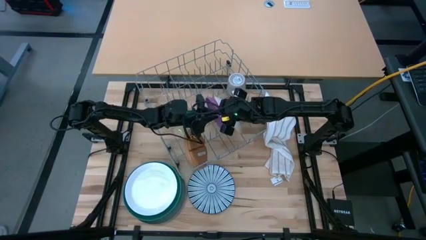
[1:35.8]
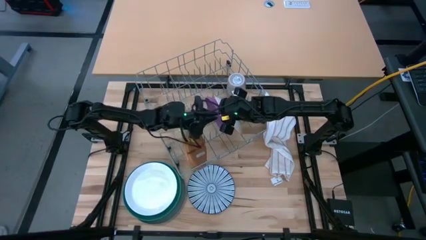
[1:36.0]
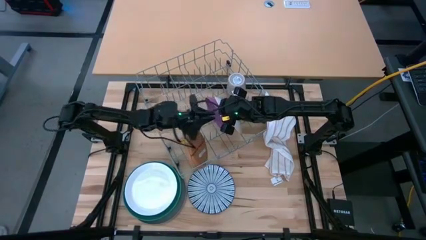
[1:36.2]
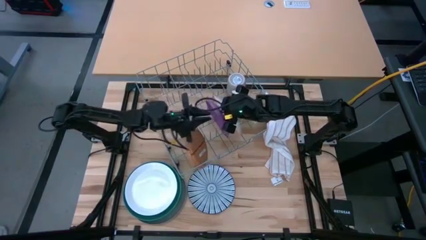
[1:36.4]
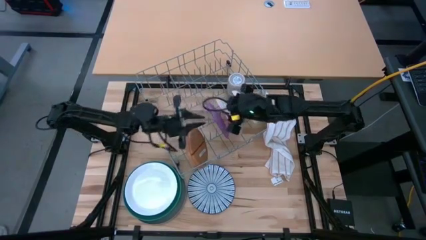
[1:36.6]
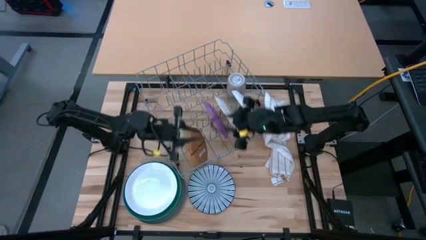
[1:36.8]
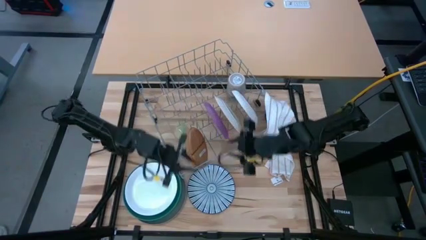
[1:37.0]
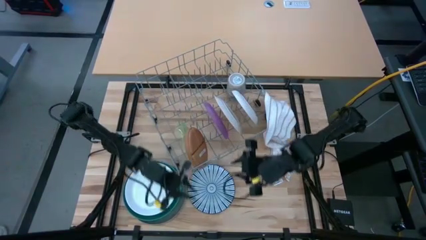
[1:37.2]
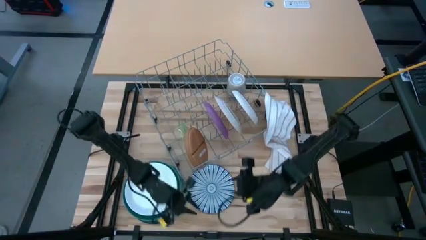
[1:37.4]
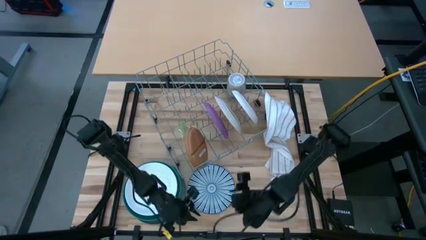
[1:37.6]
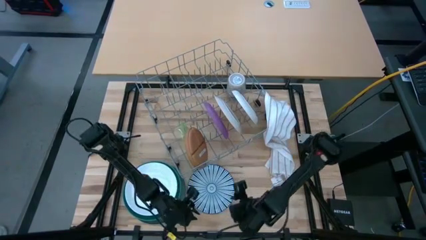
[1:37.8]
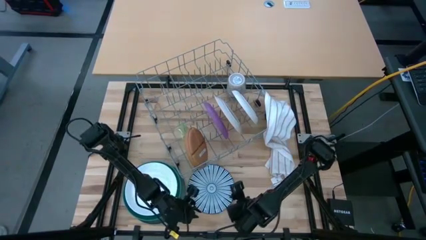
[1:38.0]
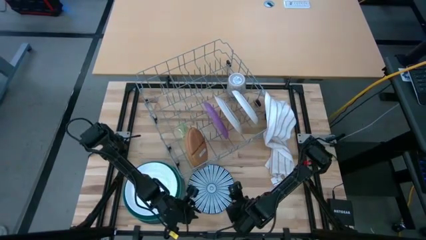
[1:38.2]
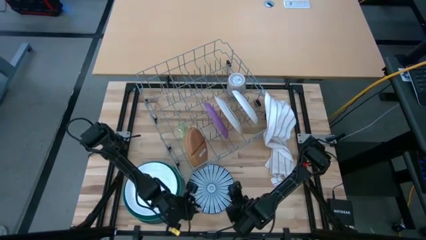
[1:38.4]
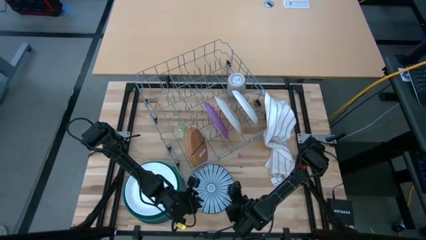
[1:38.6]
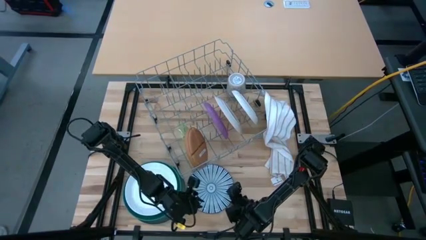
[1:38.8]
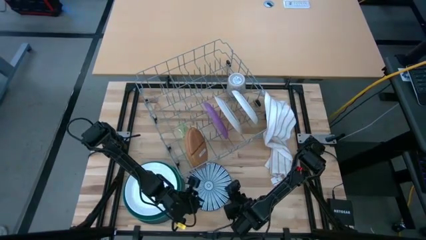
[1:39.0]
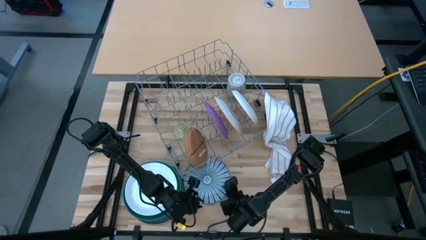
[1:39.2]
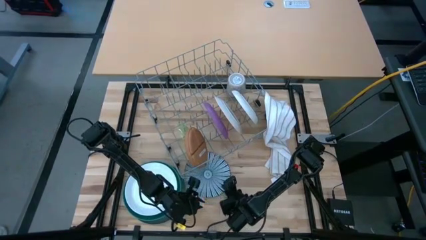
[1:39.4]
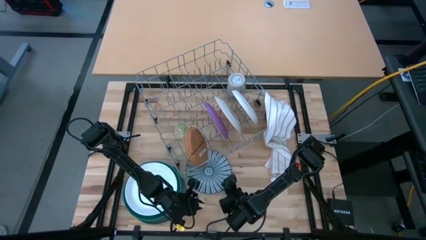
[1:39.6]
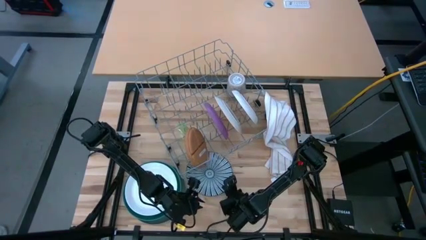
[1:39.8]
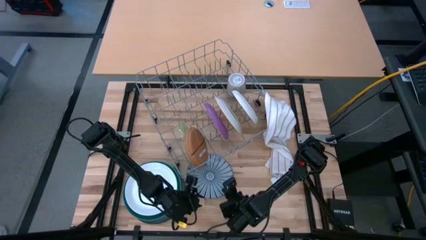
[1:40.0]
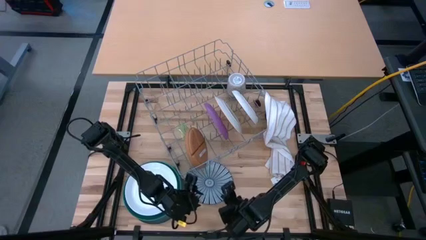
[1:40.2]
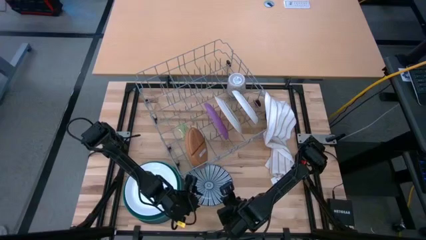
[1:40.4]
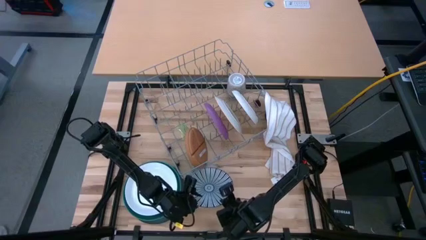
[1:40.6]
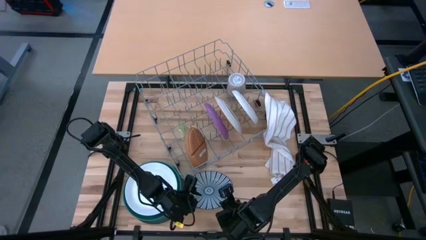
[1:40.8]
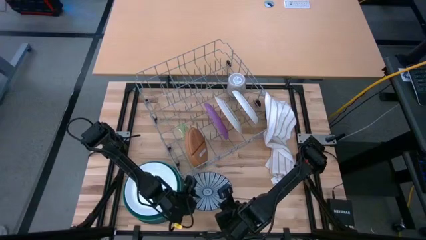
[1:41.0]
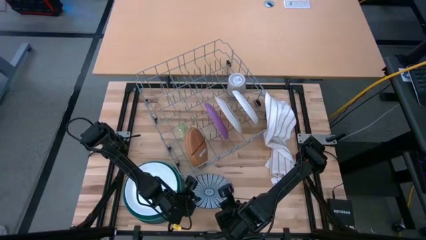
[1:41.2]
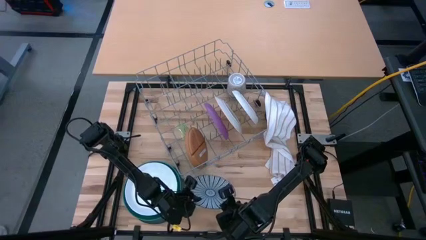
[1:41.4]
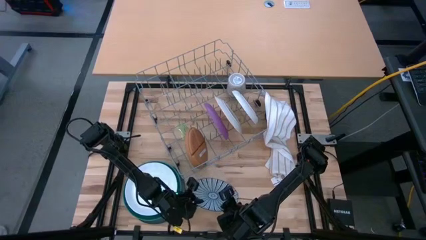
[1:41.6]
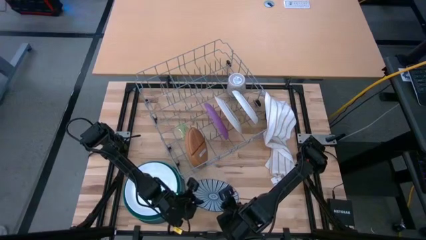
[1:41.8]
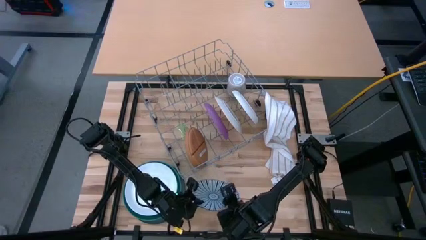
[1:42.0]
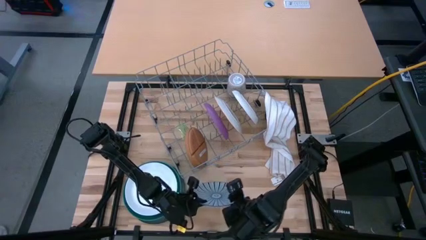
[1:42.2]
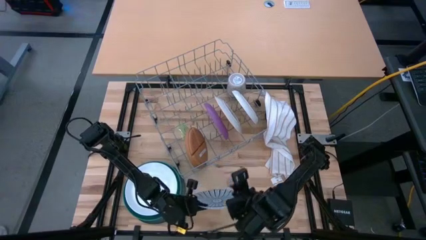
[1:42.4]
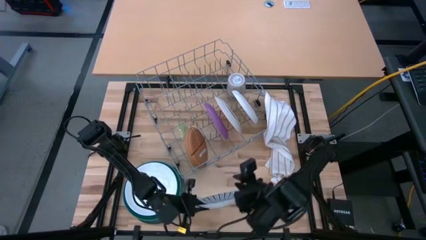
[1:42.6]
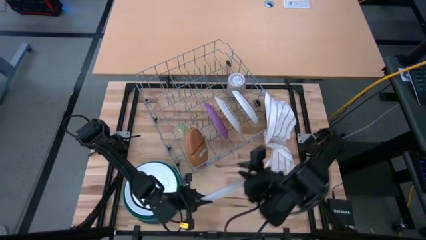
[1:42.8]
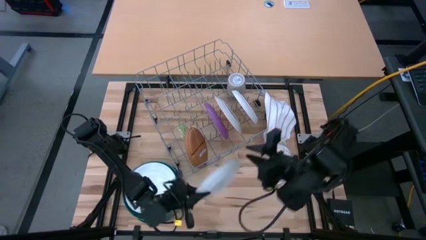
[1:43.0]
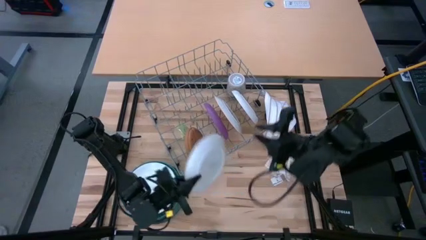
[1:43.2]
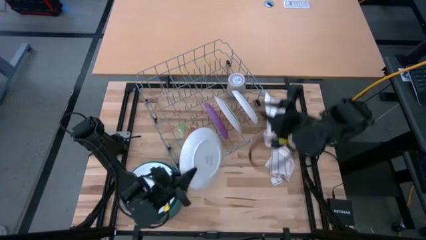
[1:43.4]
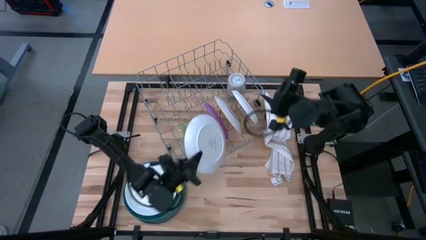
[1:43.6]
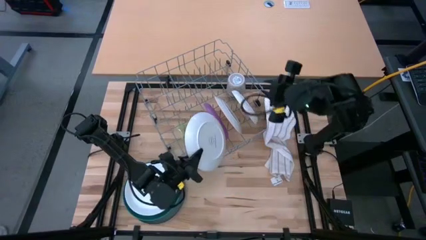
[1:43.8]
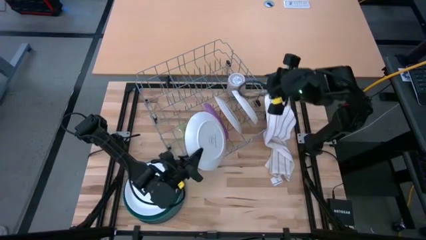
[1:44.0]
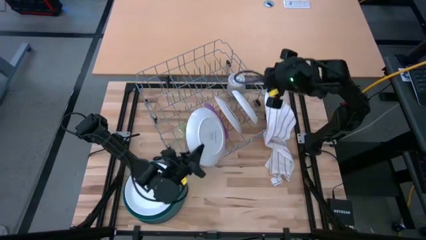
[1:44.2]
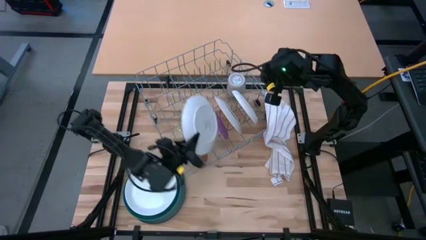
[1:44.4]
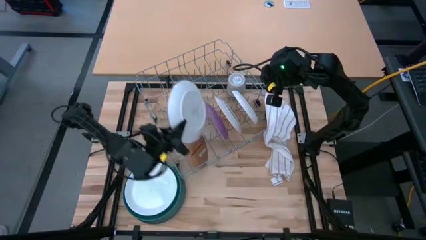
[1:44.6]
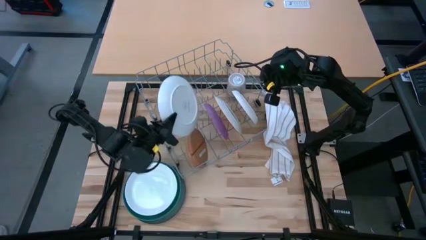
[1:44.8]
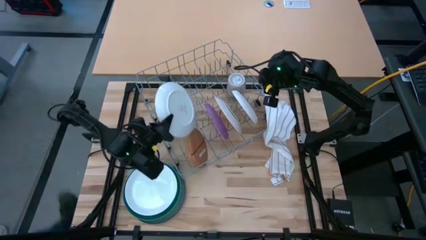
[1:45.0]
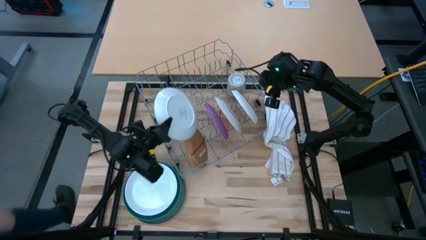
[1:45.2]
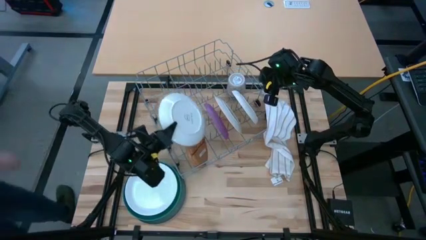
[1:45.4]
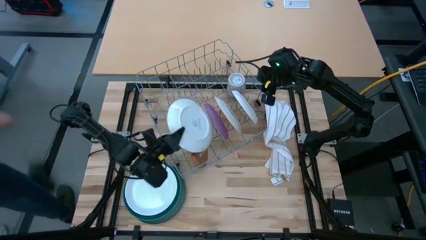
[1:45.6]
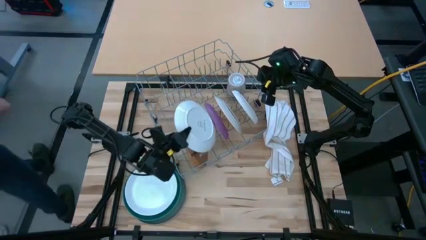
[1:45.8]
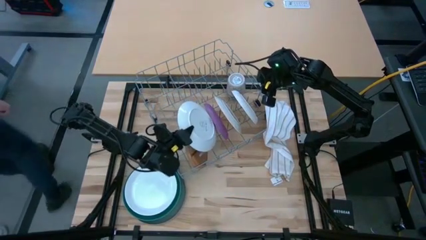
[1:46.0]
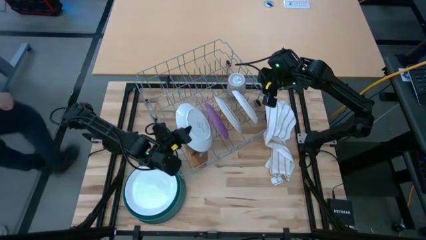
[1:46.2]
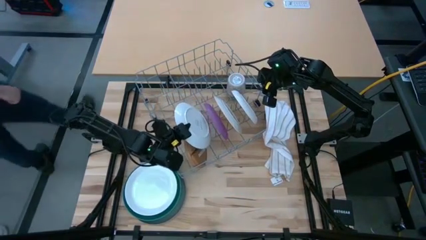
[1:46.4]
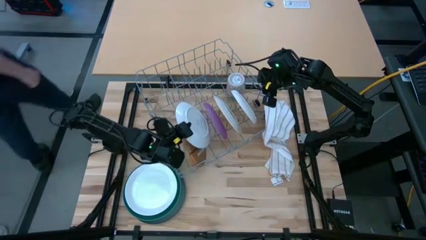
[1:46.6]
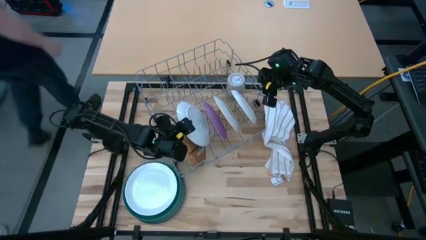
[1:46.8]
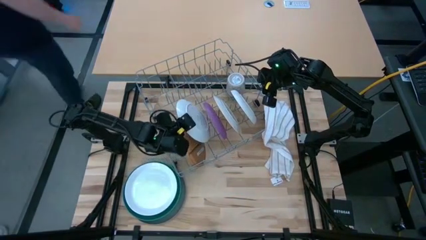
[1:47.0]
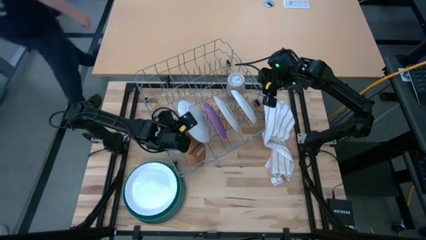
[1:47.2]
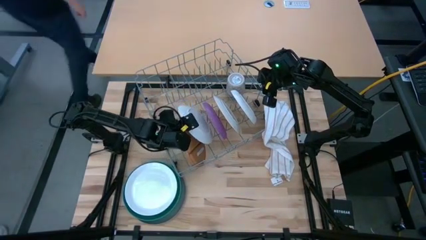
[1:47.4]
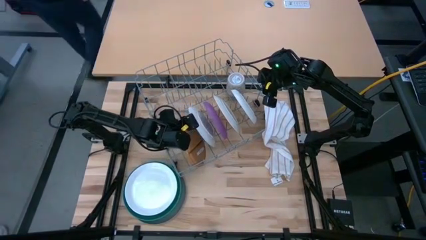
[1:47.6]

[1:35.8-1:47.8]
Task: Sort dishes
Put the blue patterned plate into the rack

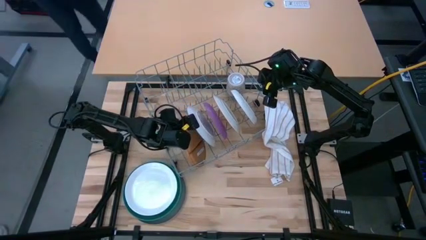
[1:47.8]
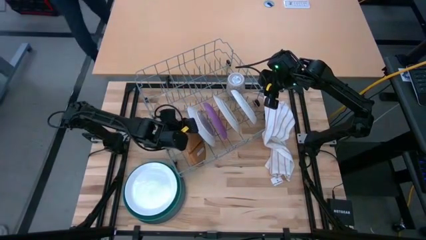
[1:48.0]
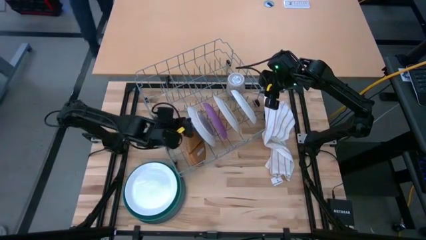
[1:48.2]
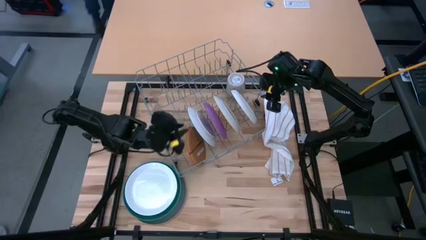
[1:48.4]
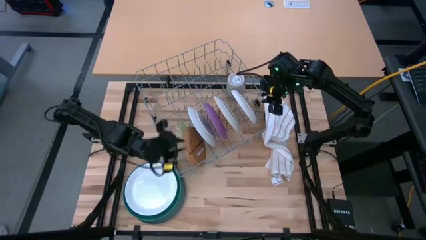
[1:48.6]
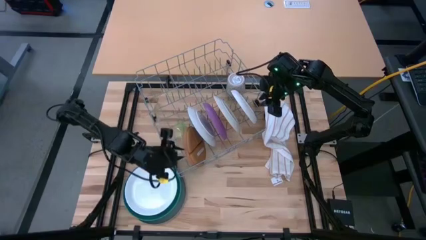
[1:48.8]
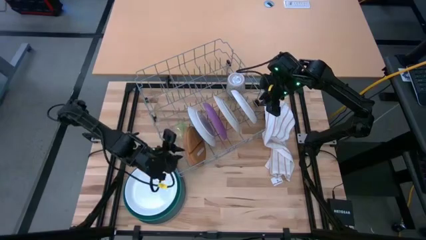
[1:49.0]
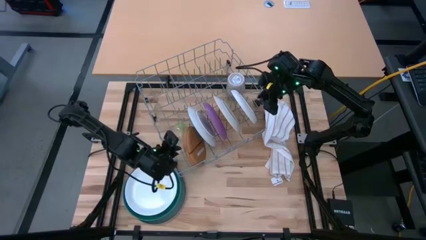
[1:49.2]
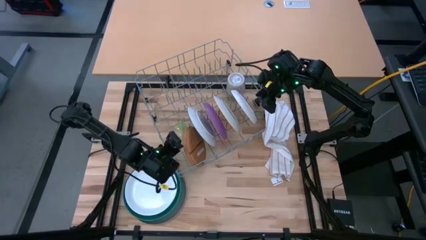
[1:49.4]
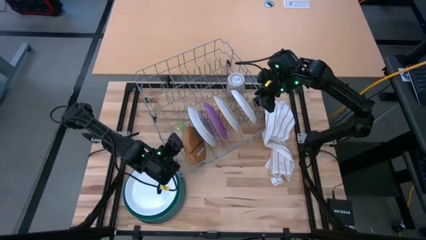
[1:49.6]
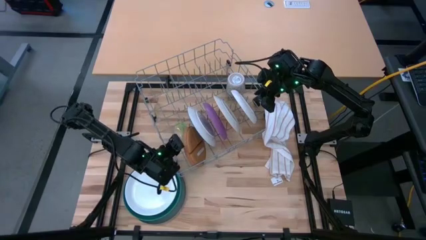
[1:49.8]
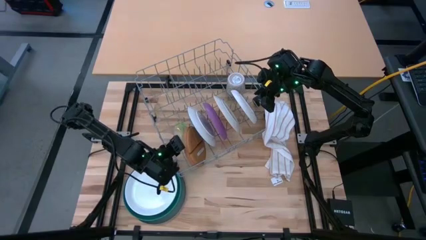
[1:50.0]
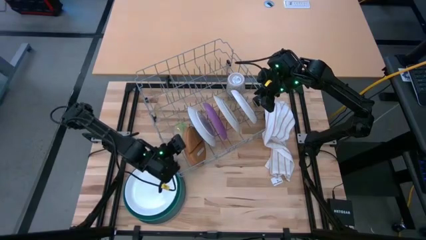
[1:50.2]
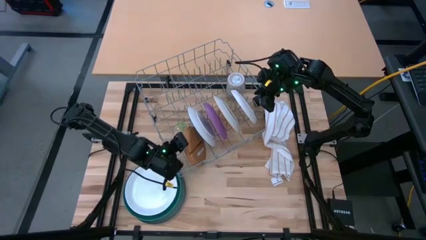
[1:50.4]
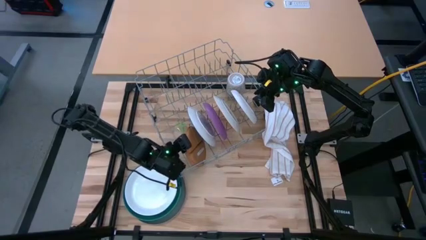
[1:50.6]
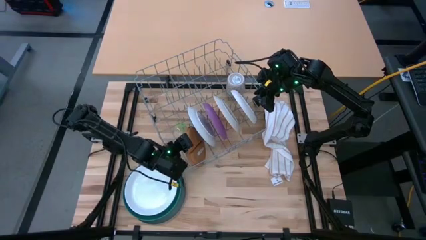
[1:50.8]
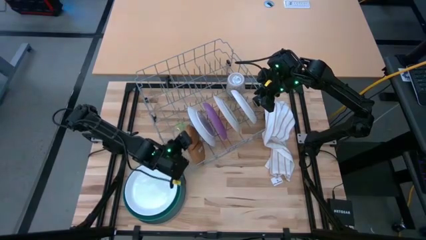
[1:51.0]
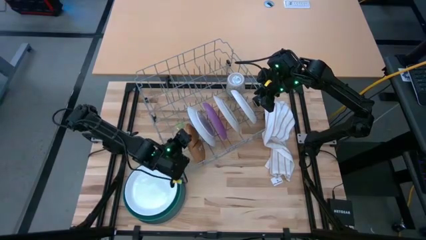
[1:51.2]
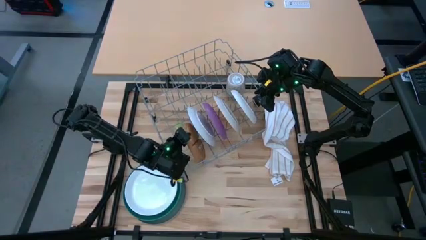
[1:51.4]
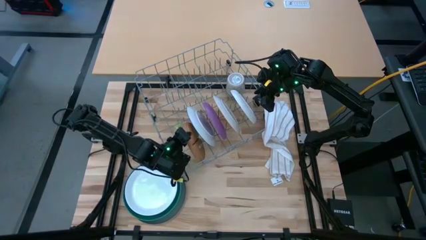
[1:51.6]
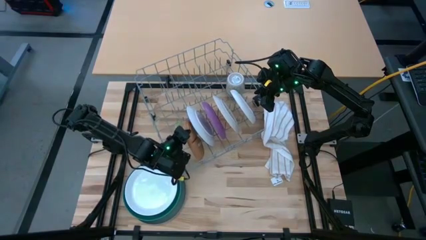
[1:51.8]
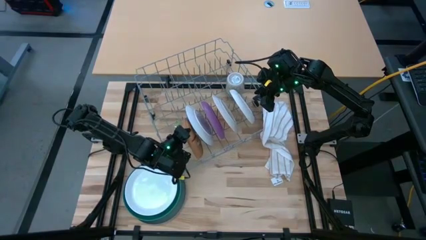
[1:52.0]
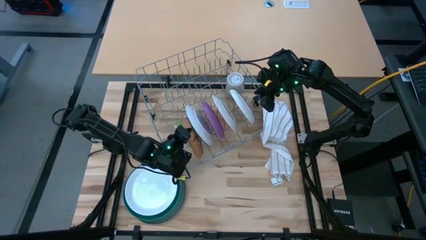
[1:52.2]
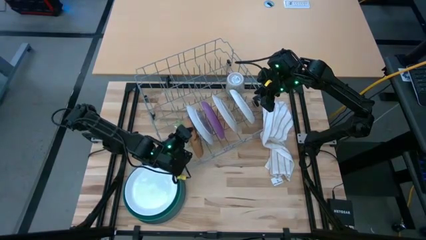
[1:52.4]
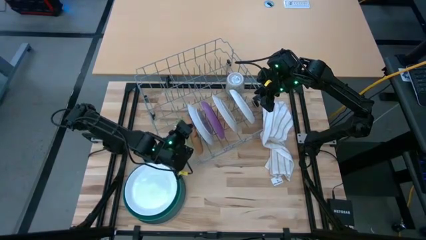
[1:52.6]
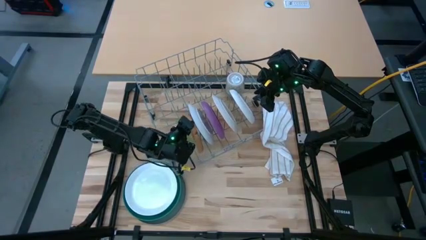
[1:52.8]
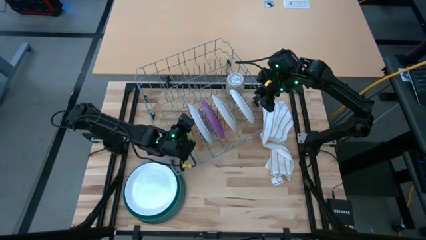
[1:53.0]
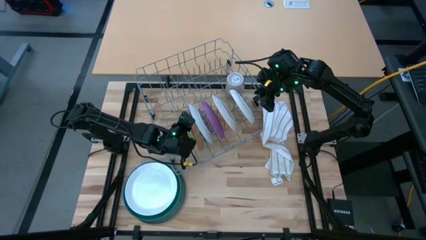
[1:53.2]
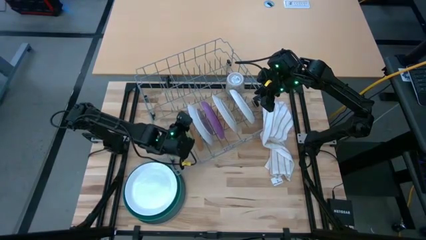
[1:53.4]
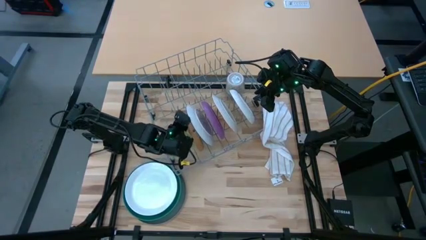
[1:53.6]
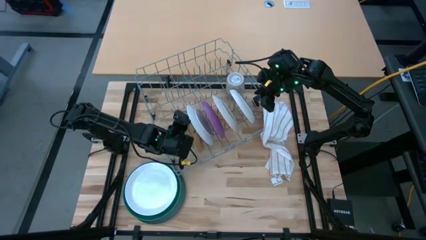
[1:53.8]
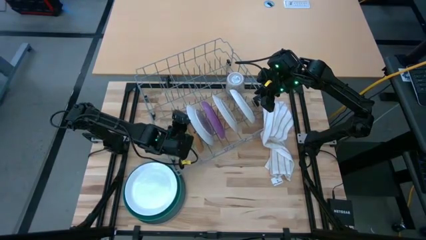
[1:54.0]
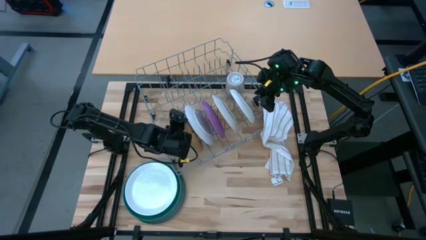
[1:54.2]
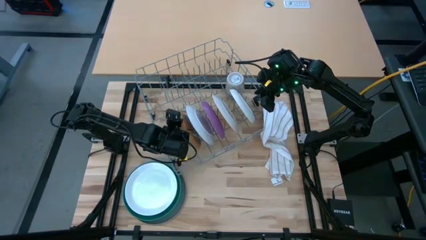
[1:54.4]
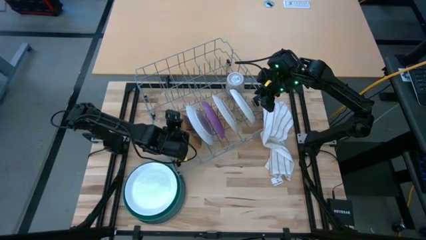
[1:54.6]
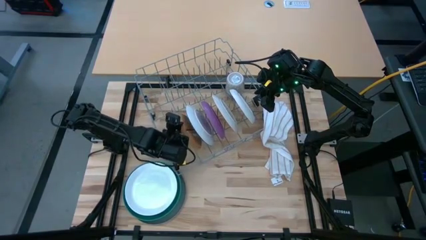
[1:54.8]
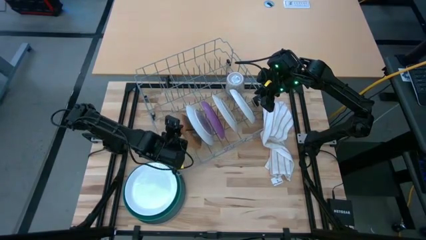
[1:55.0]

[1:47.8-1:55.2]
Adjust the brown plate on the dish rack
